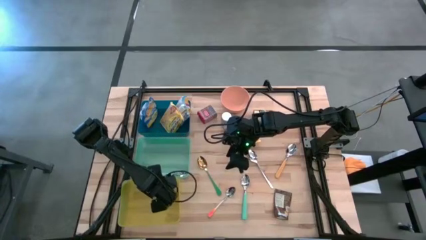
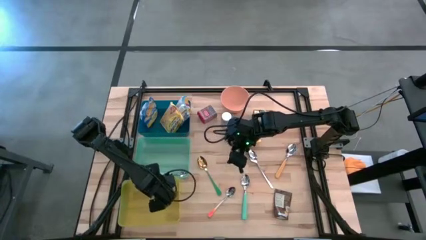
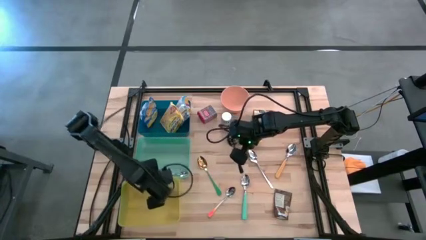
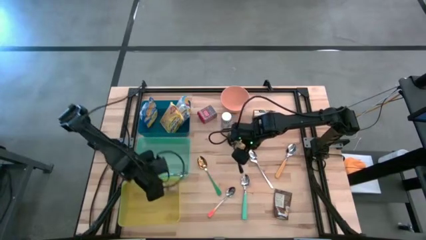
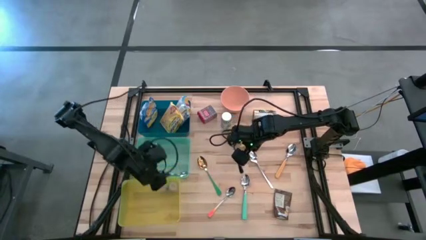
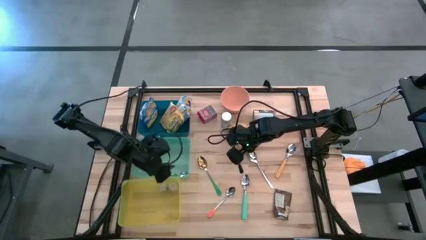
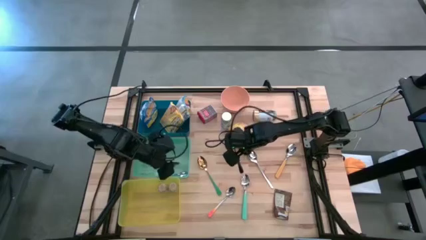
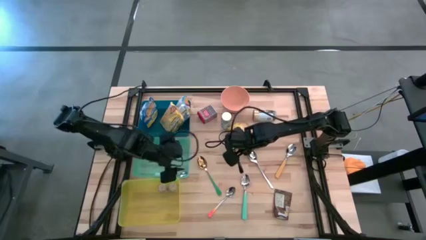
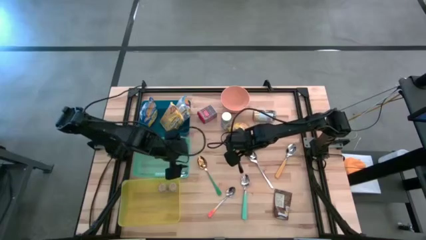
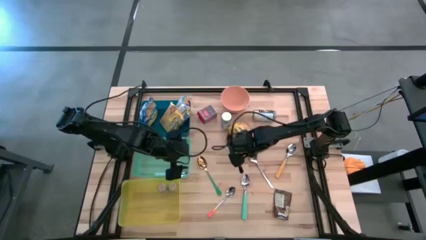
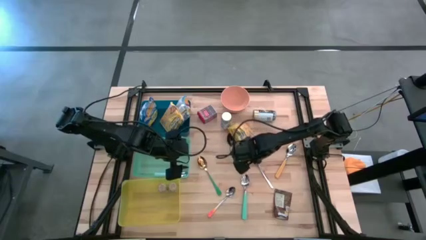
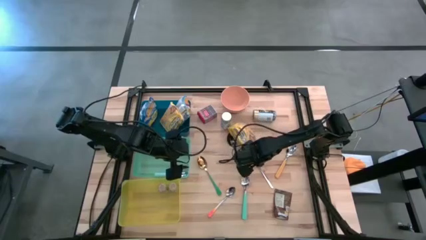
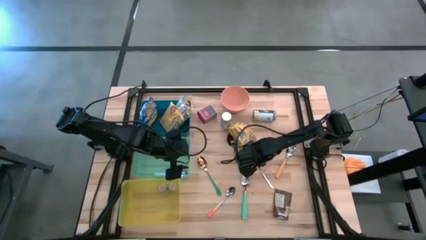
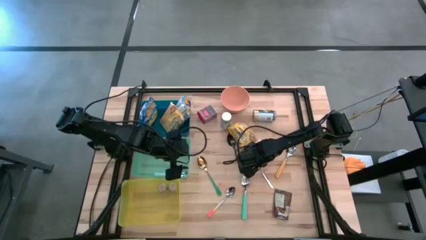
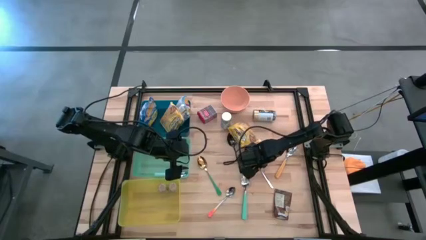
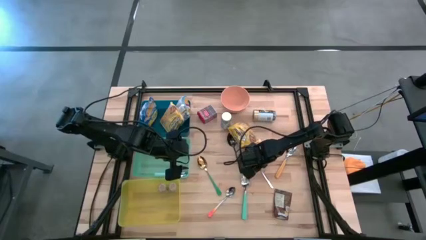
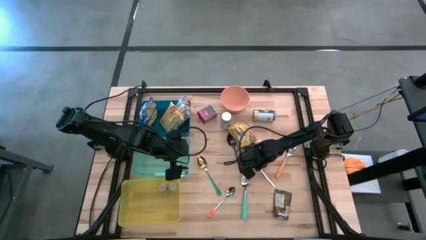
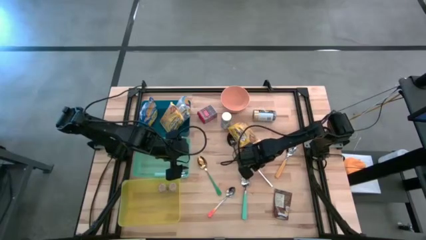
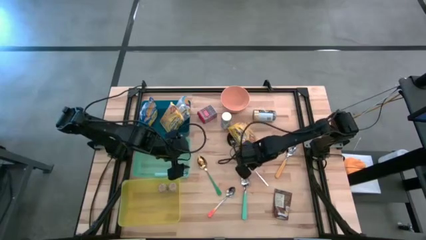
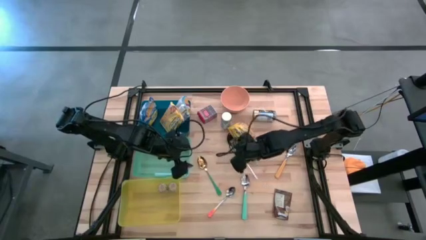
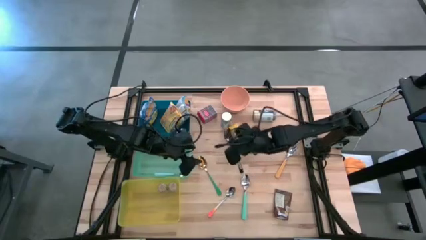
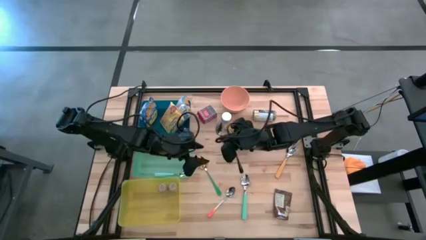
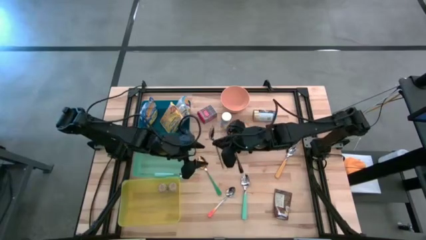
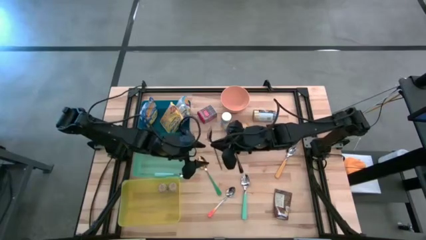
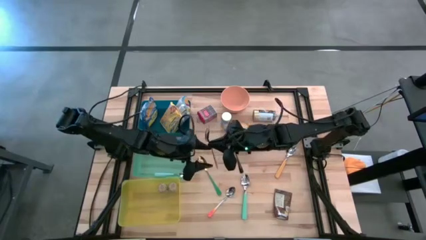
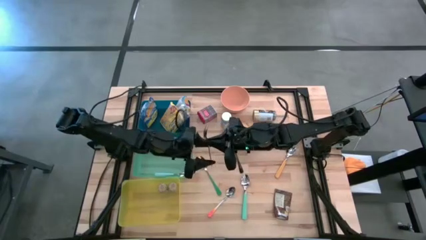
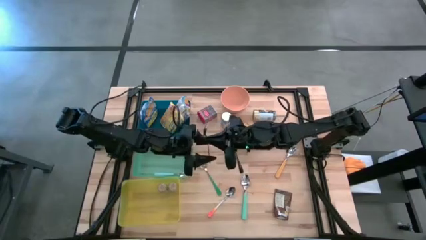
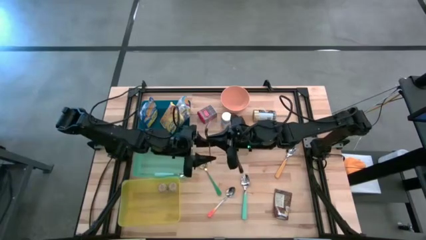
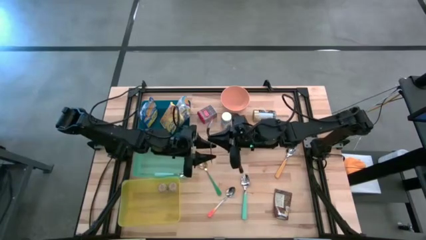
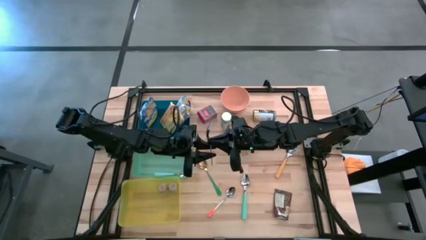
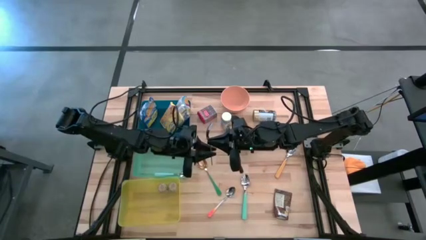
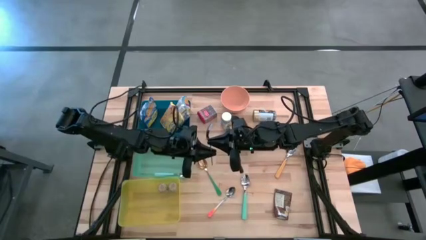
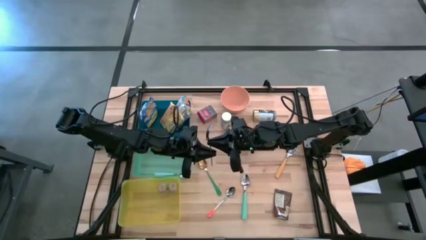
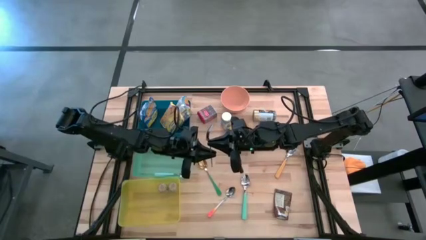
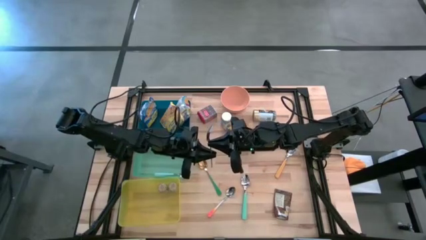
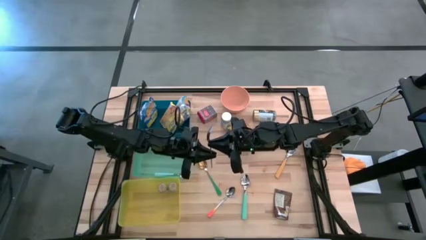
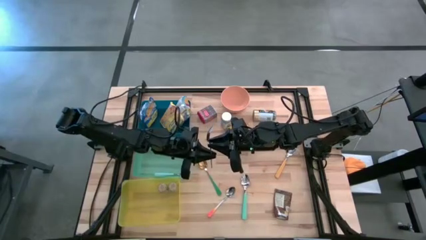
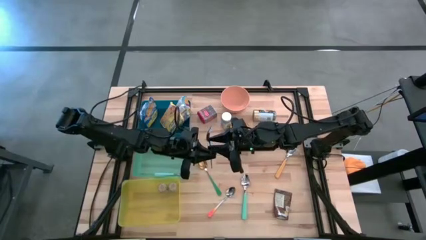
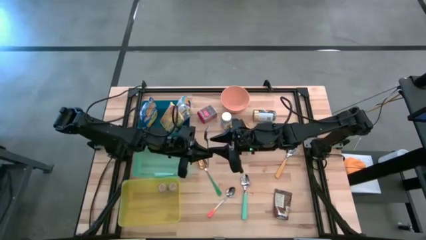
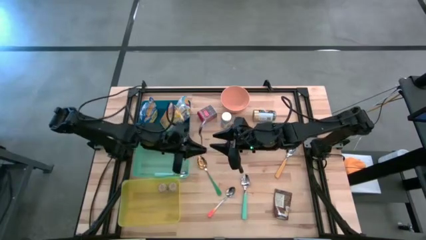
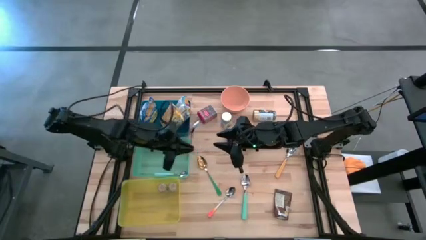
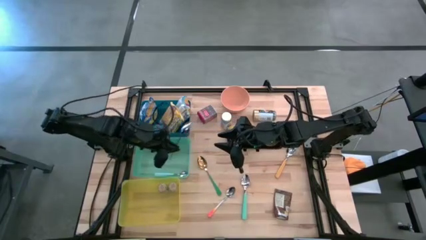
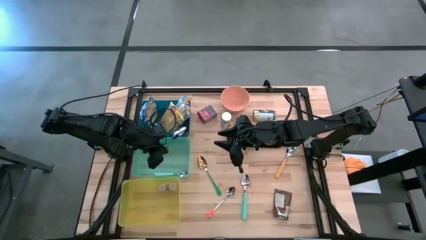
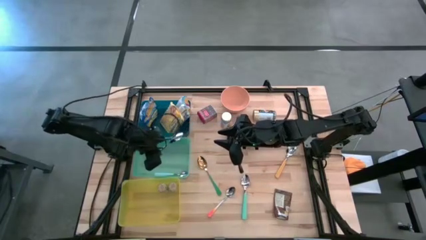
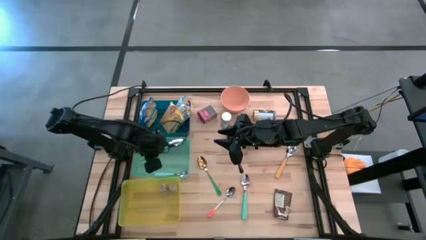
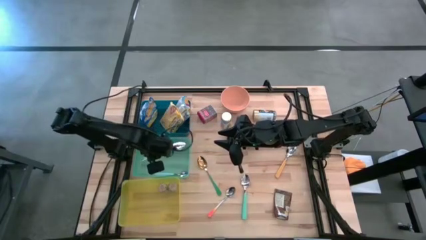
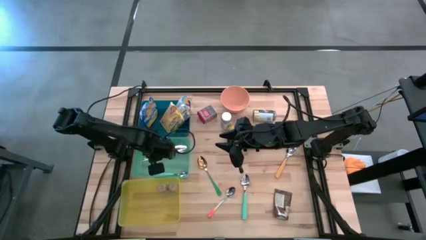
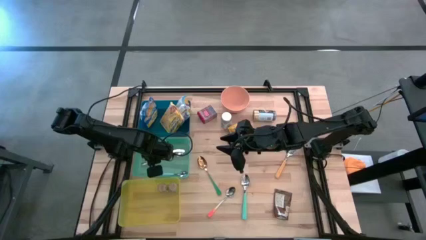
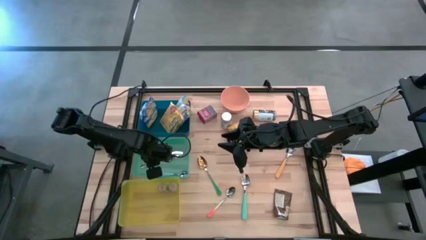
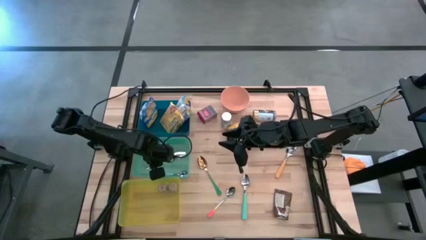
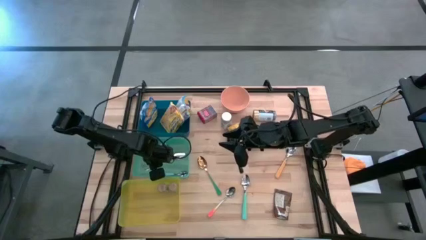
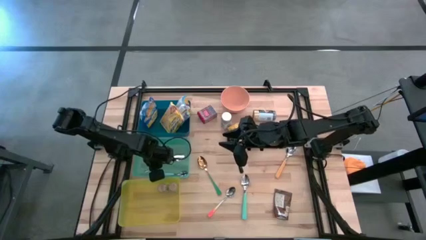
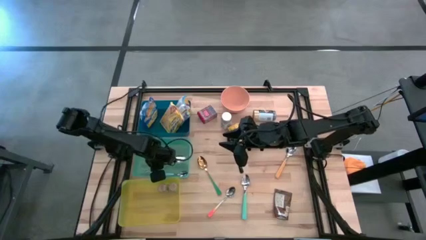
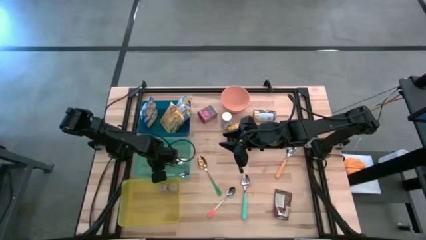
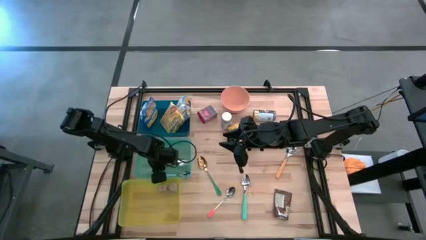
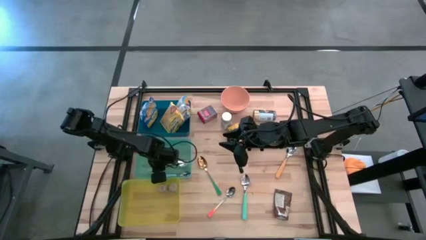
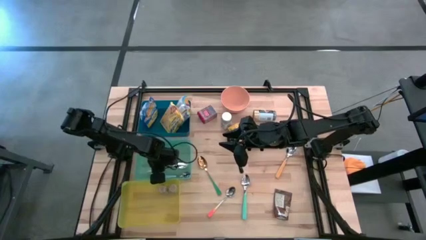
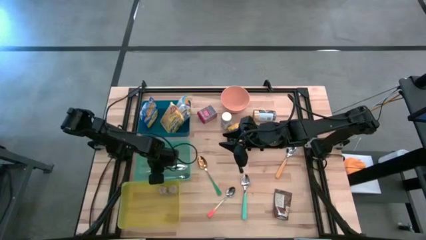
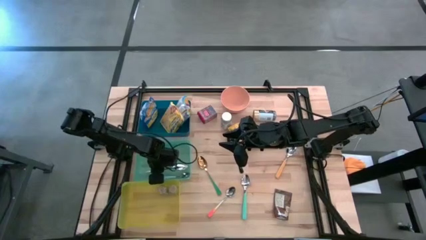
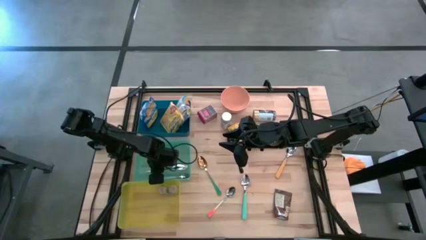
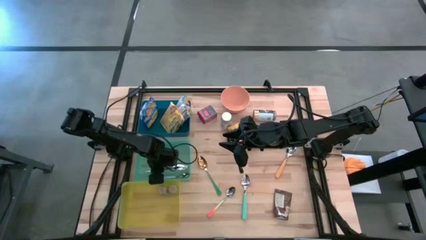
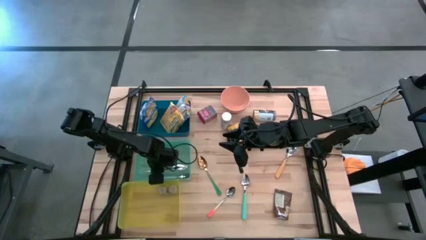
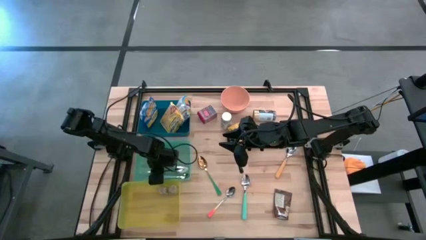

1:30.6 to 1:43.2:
Put the silver spoon into the light blue bin
